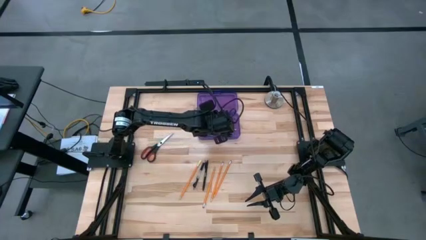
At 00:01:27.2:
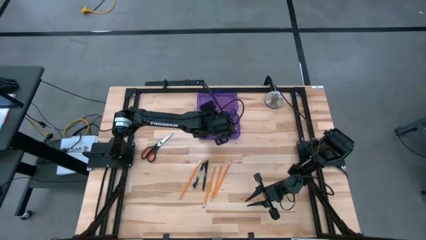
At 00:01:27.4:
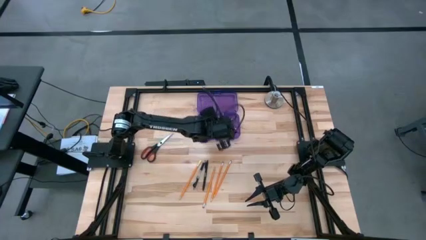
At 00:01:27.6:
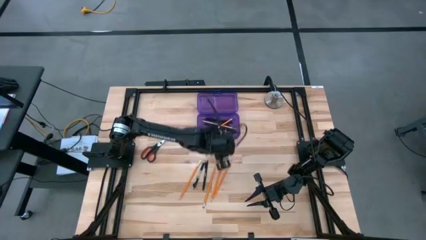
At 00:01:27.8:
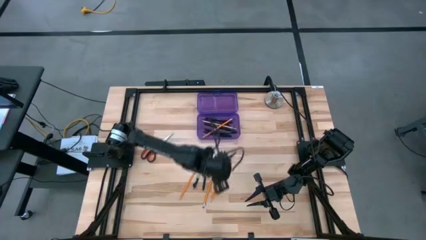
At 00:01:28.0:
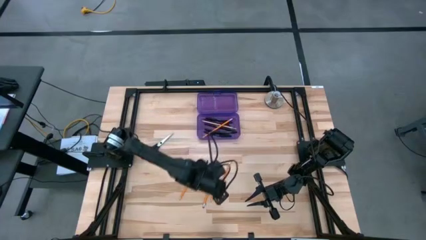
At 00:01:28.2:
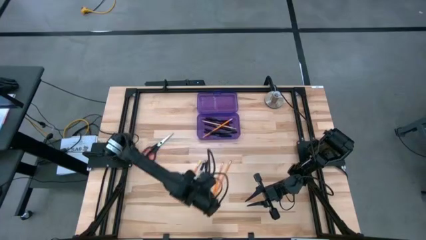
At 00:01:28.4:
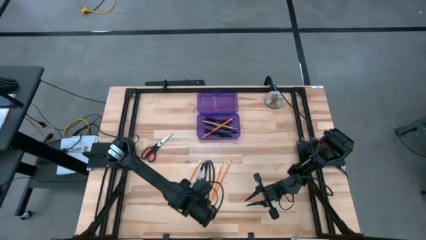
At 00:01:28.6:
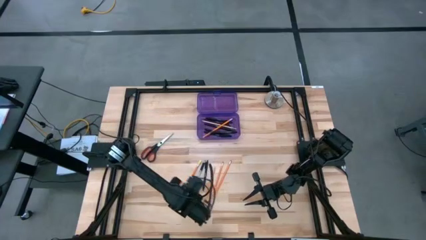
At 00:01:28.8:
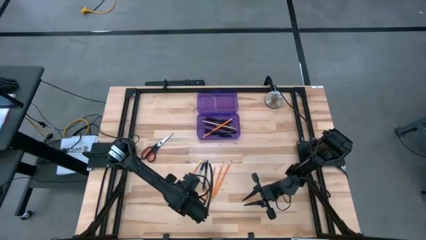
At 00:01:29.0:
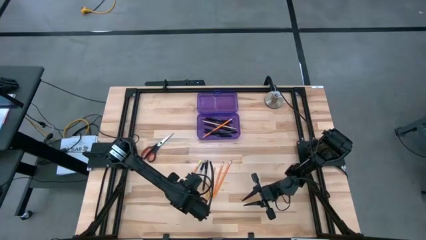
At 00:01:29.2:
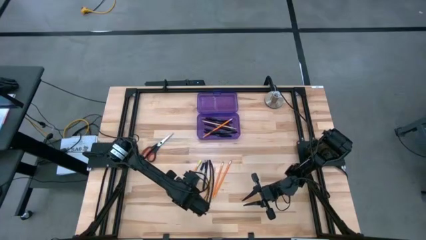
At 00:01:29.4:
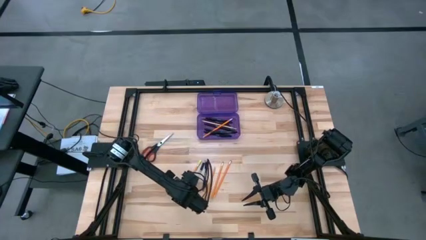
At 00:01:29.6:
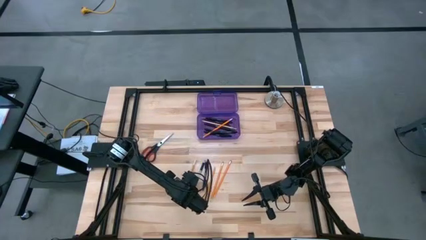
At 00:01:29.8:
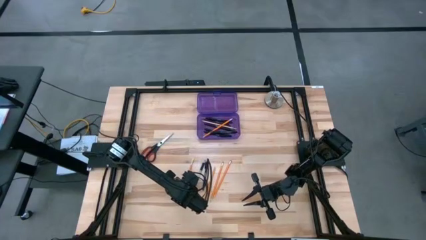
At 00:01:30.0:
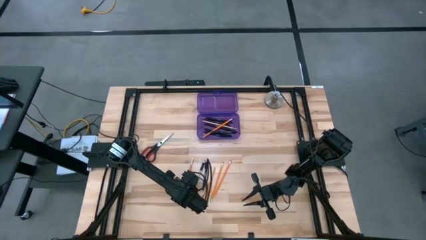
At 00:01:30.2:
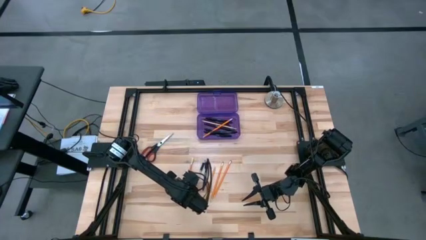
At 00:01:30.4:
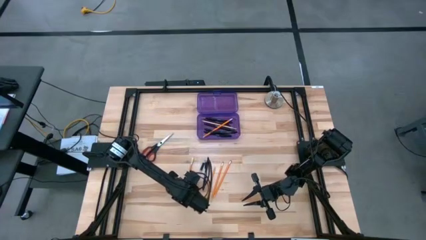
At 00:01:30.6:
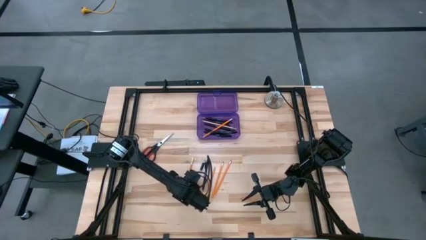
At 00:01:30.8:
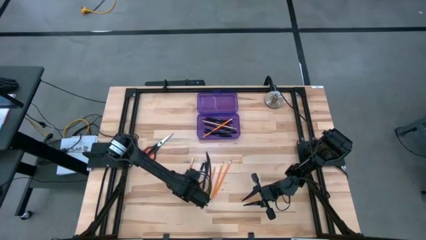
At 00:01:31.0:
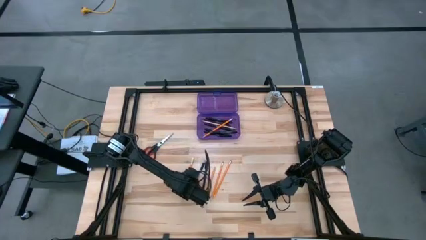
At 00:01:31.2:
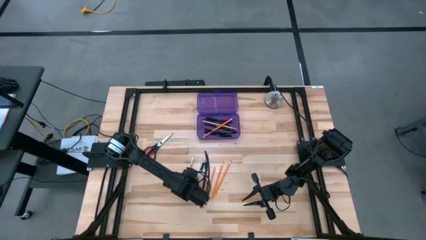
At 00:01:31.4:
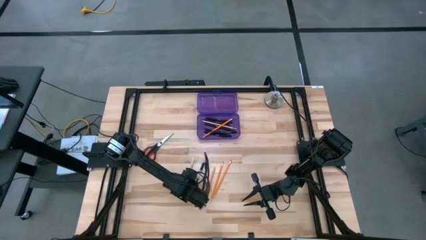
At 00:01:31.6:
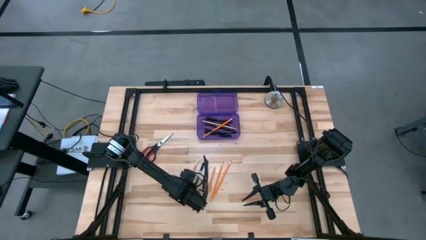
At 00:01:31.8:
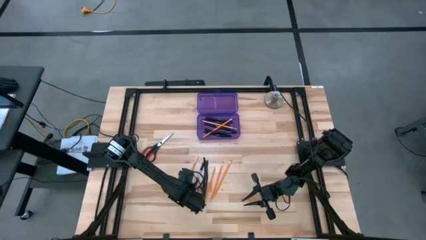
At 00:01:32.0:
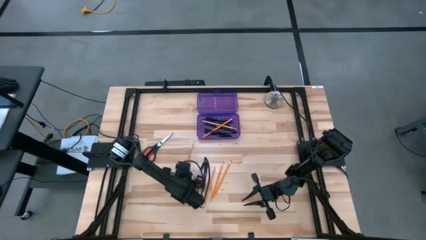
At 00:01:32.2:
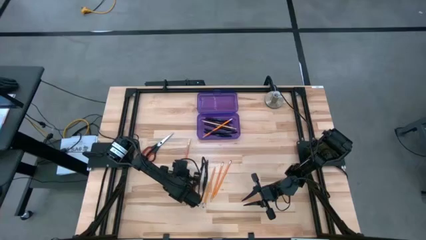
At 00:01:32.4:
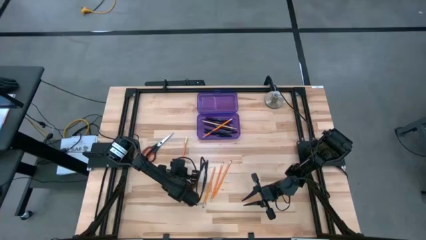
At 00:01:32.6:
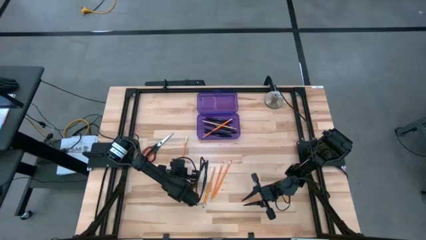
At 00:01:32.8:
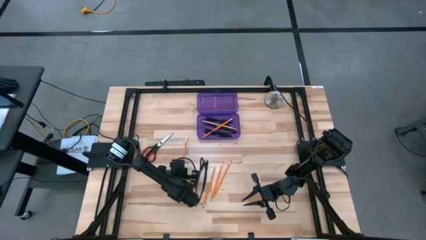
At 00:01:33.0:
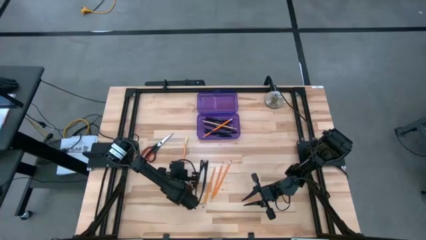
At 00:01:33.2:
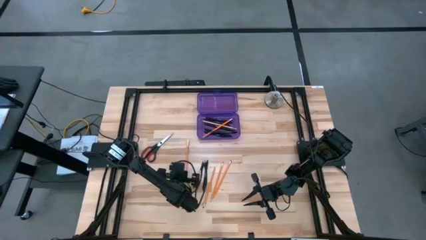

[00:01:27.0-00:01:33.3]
Task: Pick & place school supplies into a supply box
Put the orange pencil into the purple supply box

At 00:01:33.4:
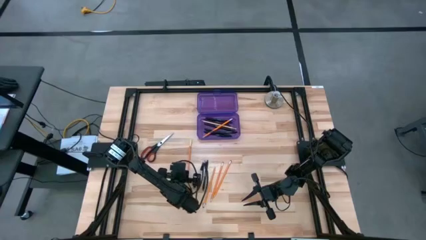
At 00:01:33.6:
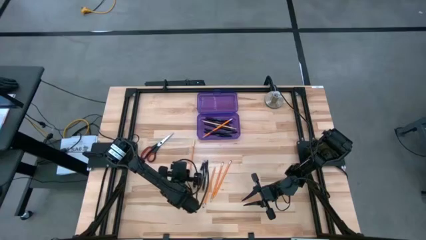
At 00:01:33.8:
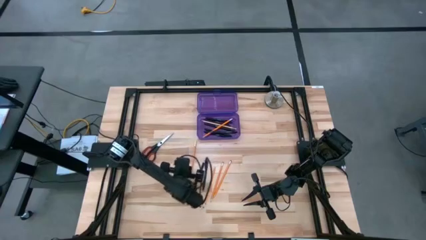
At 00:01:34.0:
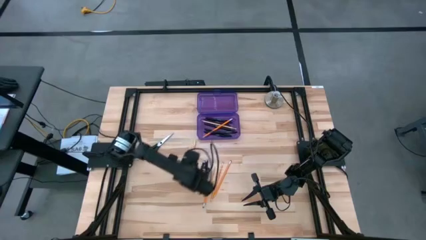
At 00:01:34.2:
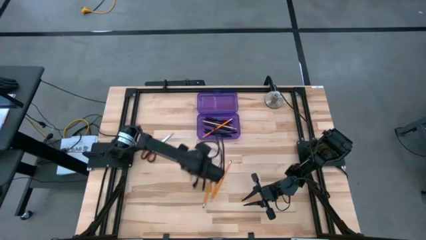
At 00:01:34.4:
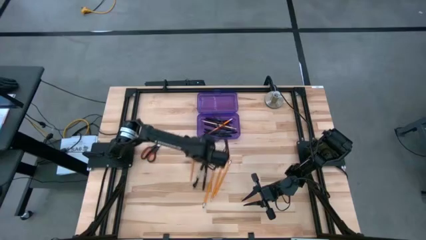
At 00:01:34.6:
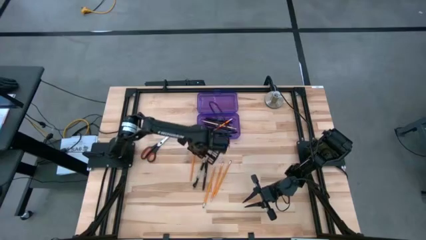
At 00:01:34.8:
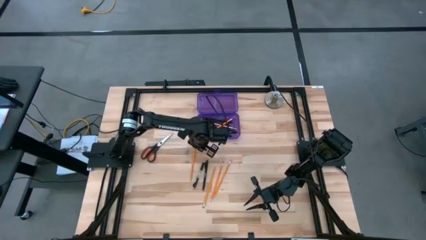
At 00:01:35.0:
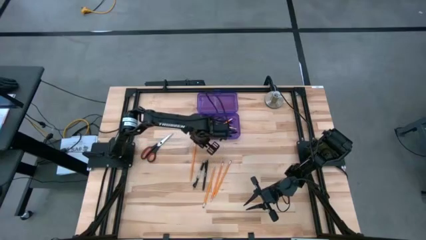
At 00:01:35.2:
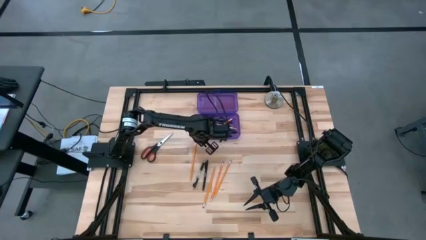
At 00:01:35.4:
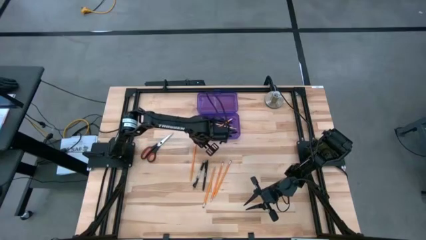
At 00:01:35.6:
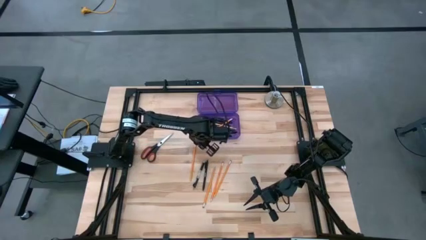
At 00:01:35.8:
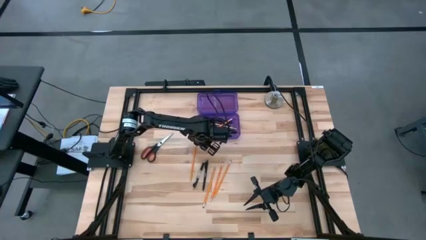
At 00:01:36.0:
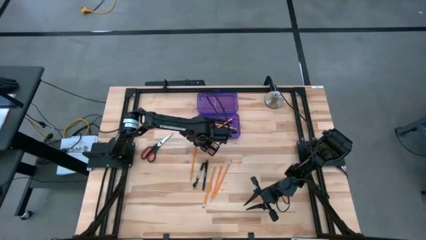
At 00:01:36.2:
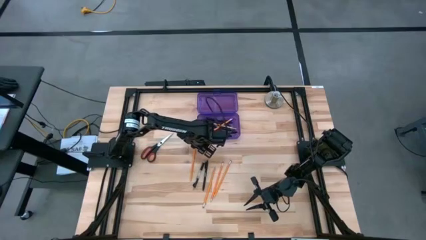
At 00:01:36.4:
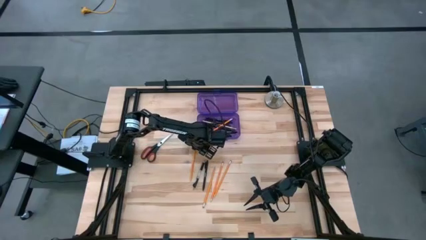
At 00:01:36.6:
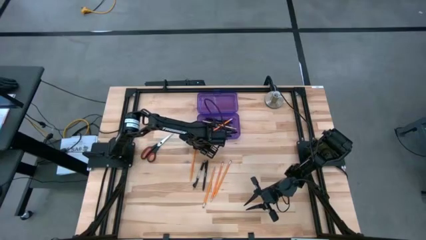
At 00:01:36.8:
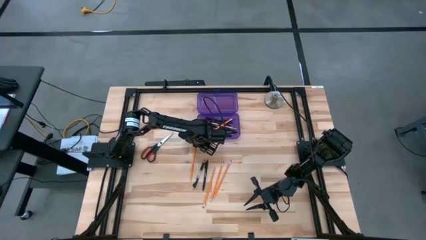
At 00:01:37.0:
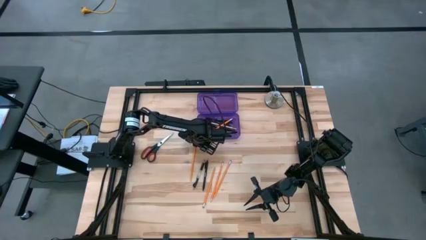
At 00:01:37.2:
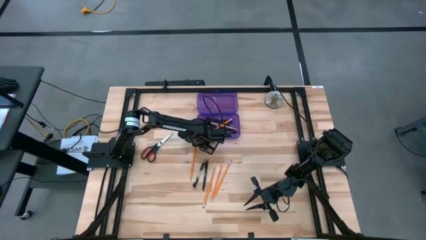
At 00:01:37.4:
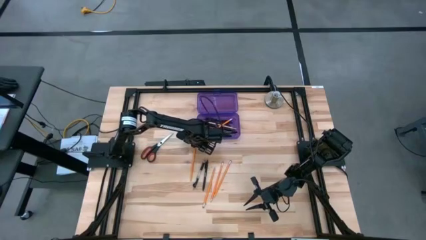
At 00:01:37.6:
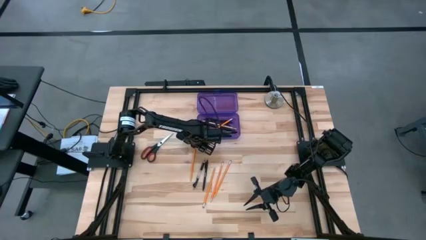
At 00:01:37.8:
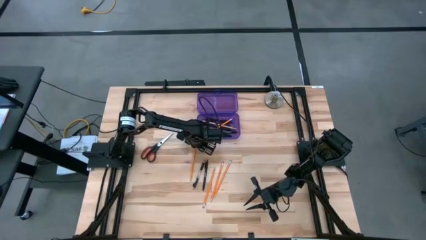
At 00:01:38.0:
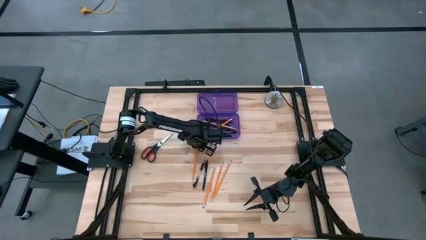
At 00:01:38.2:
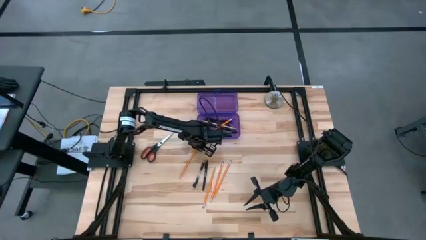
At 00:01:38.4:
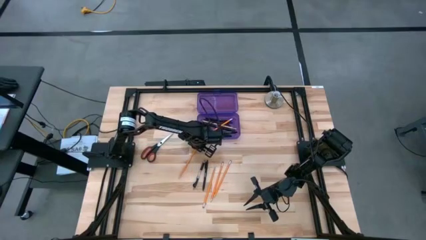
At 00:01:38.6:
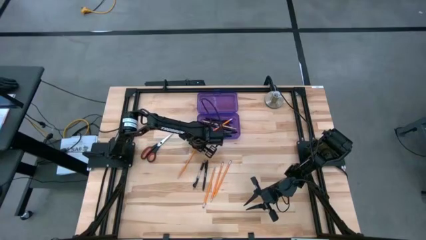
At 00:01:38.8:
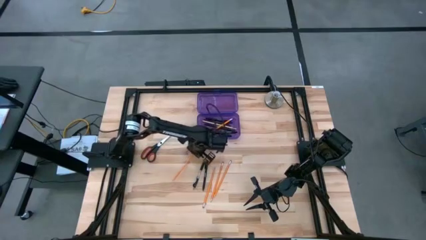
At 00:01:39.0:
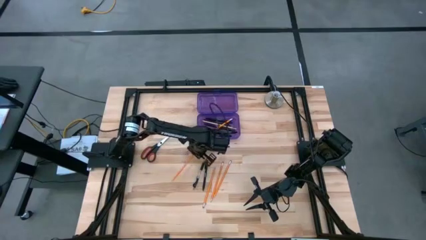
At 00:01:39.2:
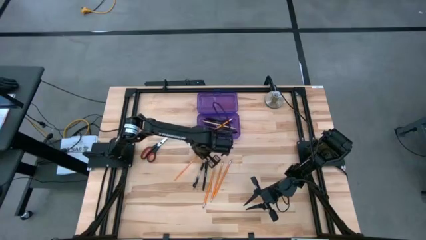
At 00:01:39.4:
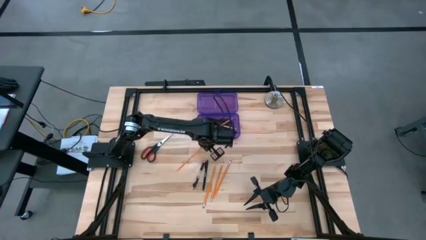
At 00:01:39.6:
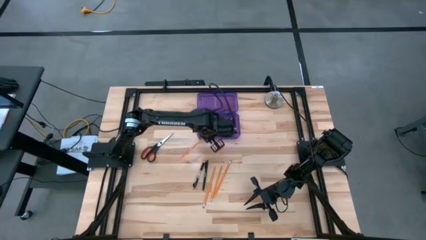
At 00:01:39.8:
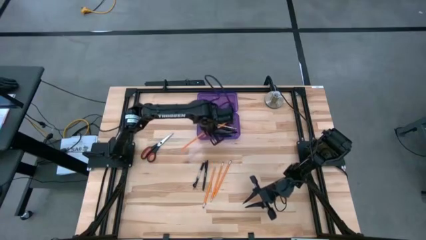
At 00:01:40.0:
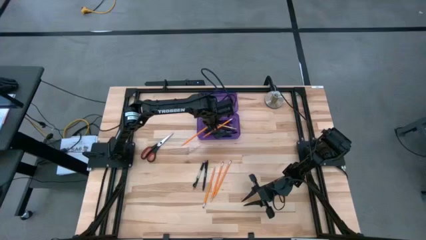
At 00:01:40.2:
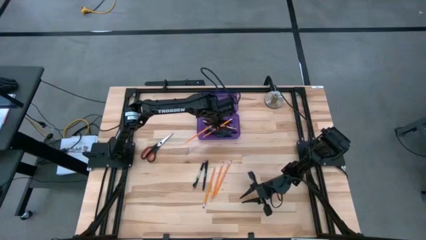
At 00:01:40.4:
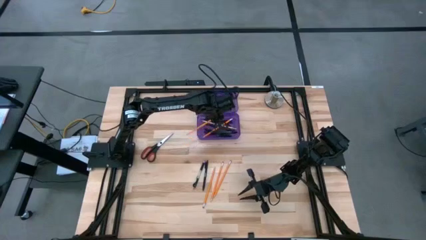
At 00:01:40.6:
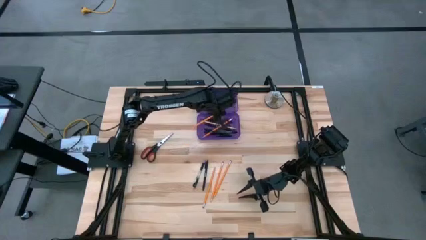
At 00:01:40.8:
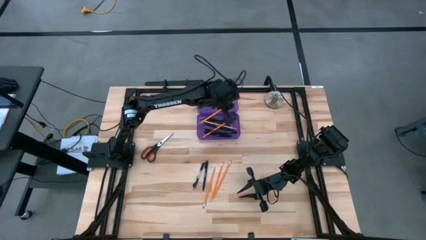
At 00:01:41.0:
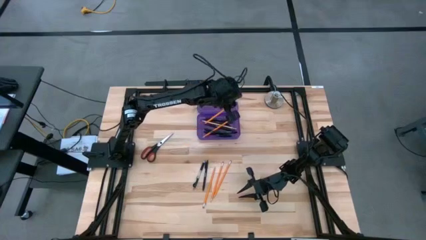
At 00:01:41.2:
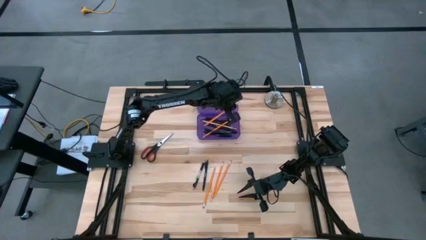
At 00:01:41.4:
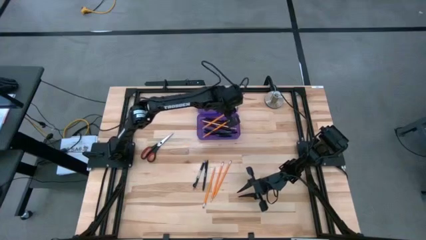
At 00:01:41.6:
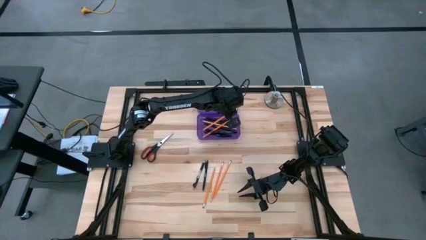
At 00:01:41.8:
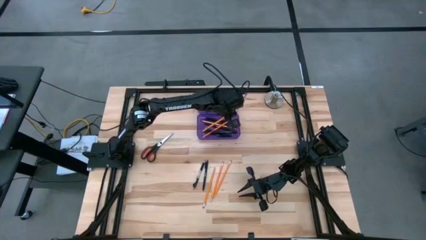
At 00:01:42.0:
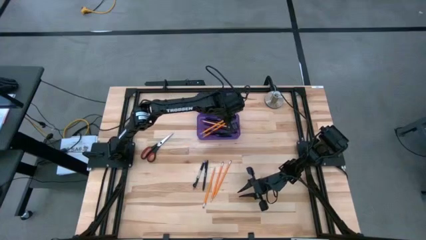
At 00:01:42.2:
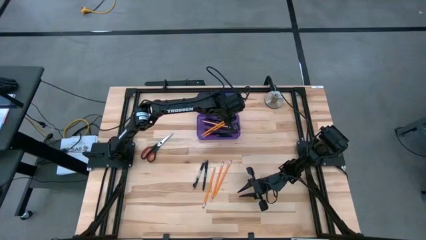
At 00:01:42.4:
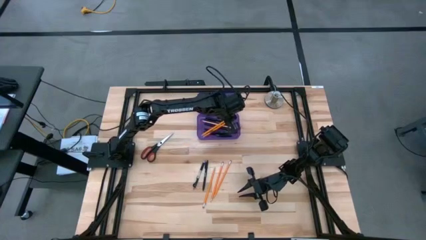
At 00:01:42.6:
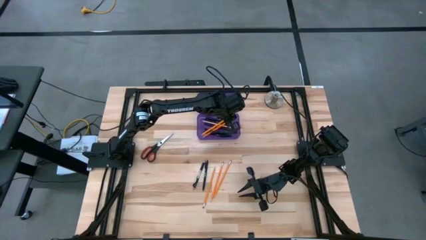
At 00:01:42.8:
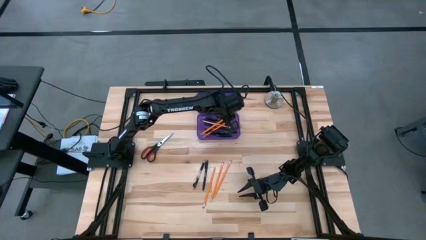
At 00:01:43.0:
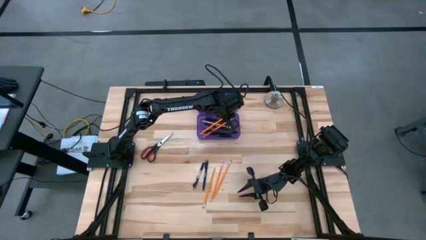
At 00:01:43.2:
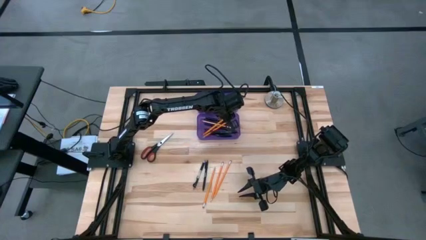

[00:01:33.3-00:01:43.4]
Put the orange pencil into the purple supply box
